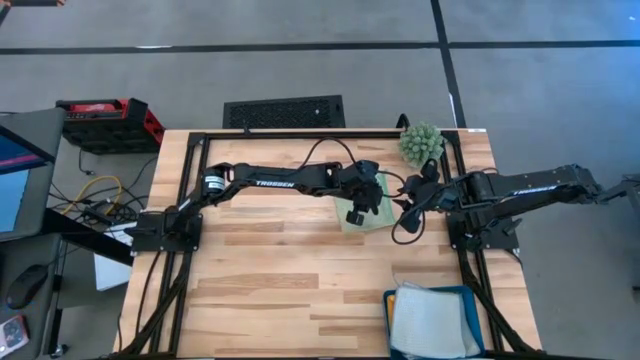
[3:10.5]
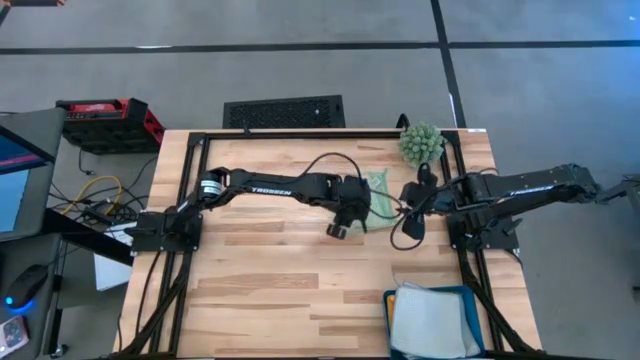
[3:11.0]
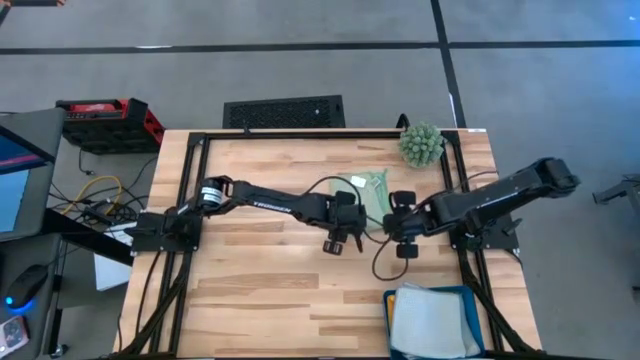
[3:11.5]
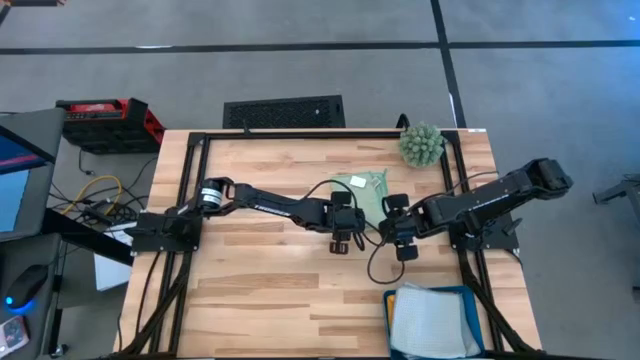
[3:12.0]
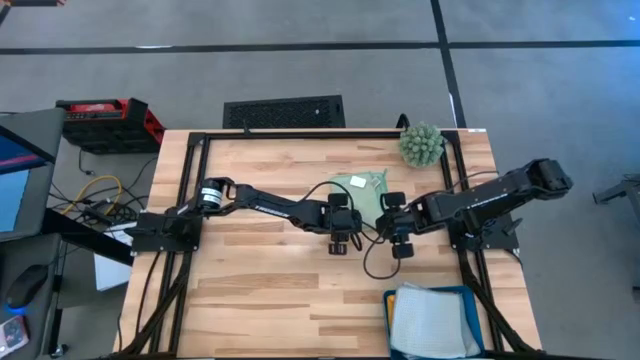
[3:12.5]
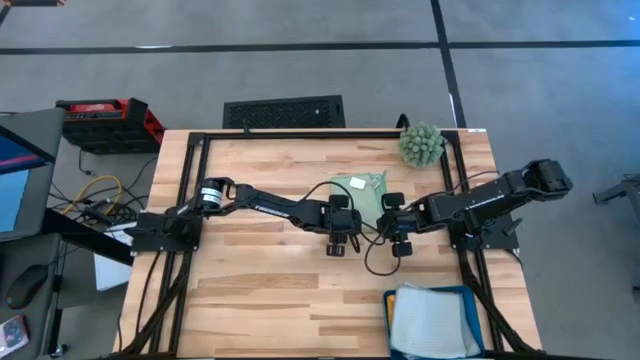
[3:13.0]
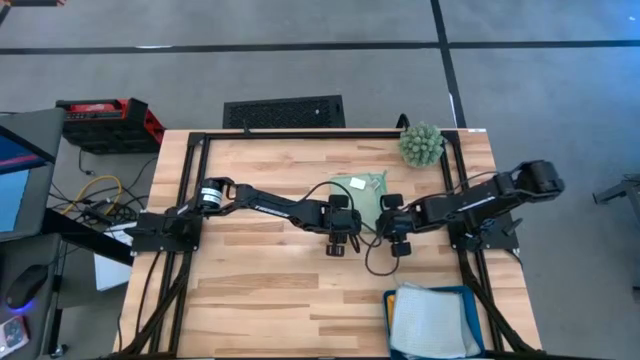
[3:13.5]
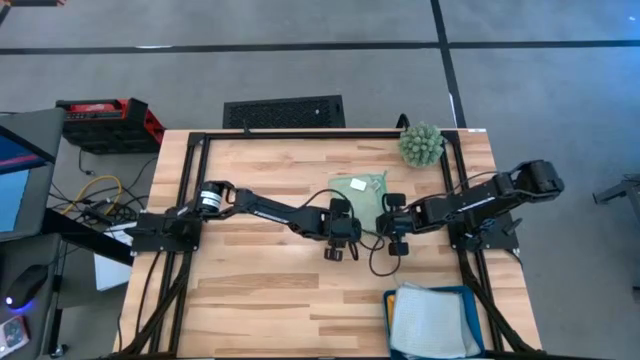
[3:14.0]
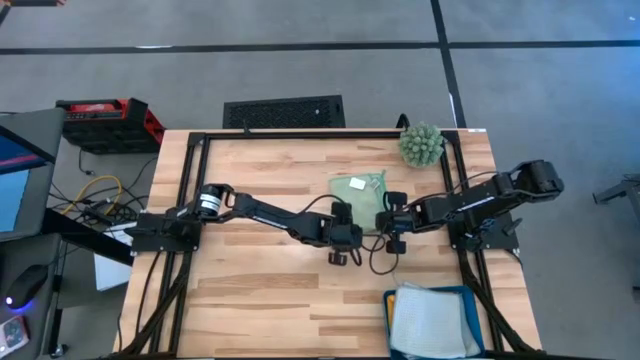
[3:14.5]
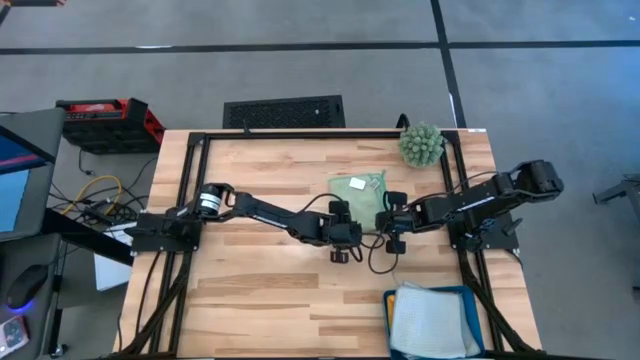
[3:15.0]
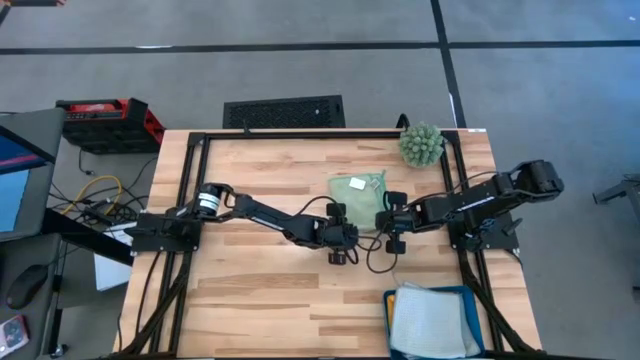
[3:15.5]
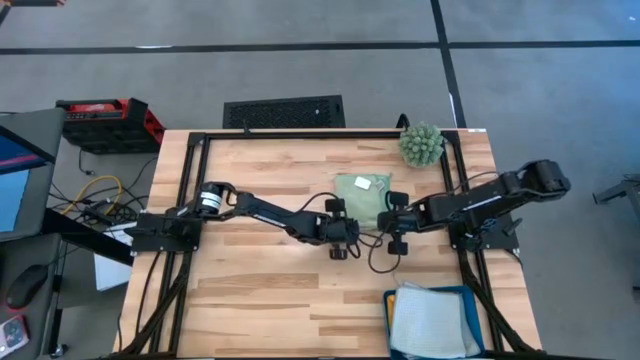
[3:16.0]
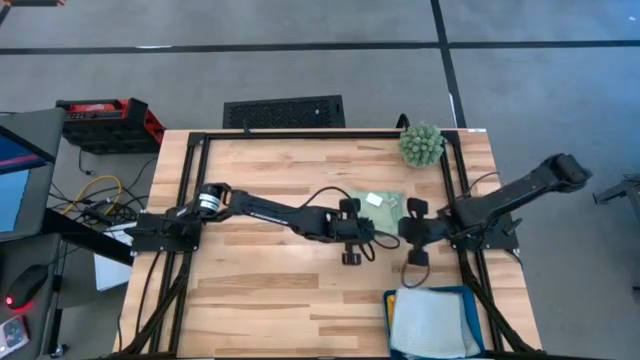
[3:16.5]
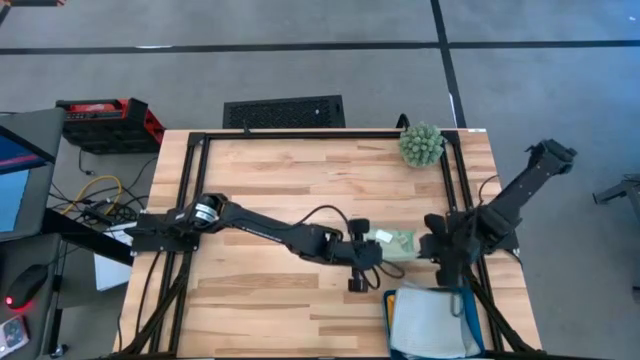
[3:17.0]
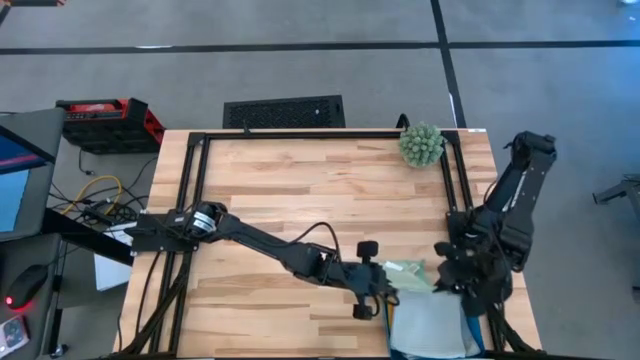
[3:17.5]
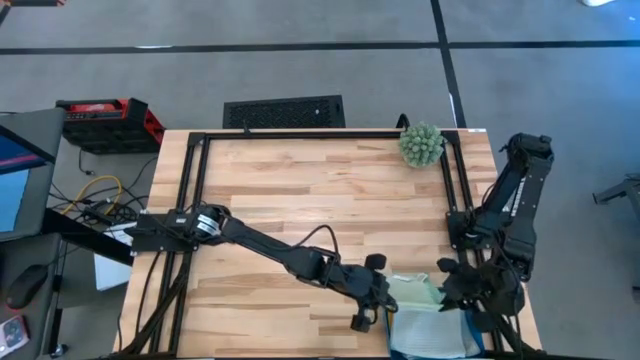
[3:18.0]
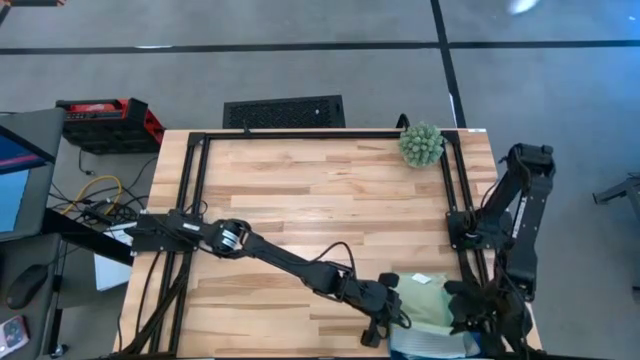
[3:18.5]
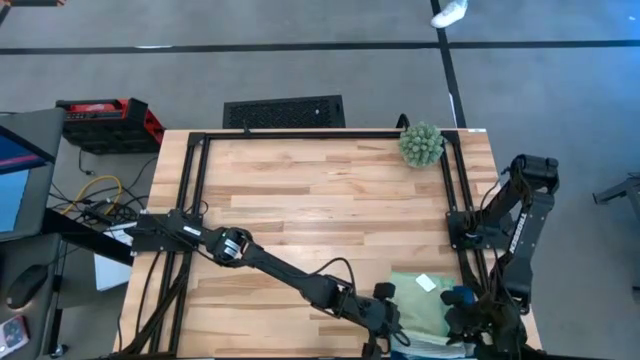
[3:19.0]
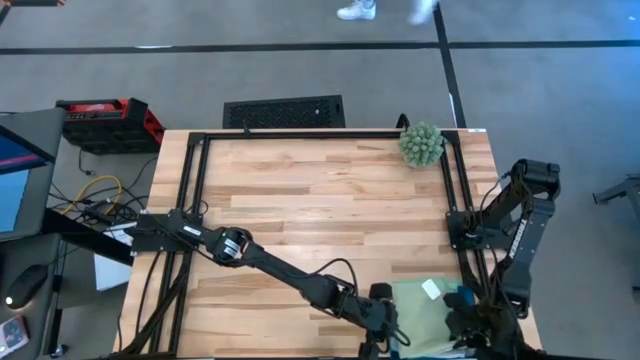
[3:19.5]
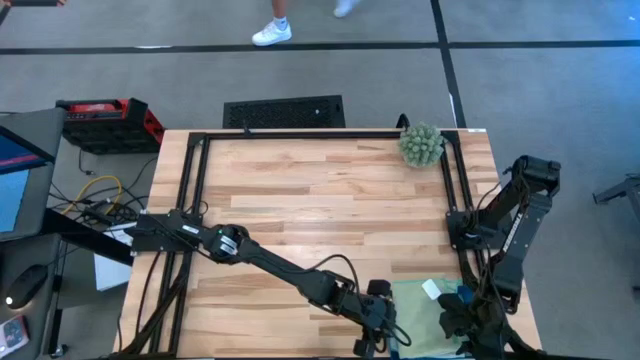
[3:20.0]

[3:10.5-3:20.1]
Task: Fold microfiber towels
Put the folded green towel into the blue bin

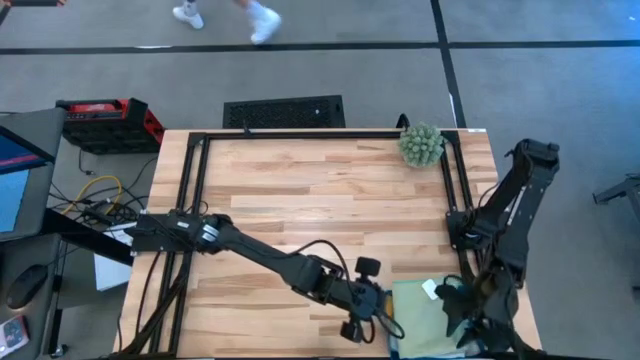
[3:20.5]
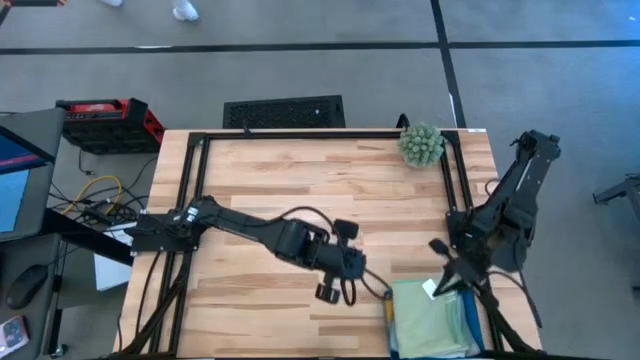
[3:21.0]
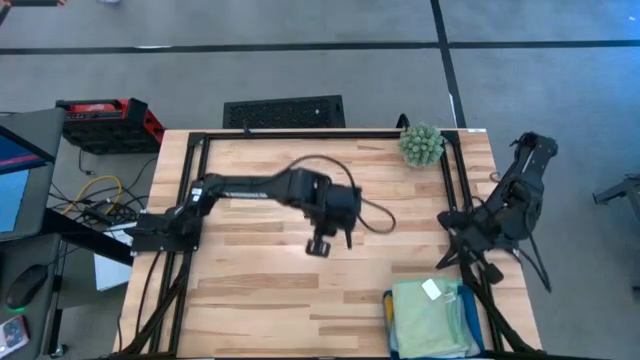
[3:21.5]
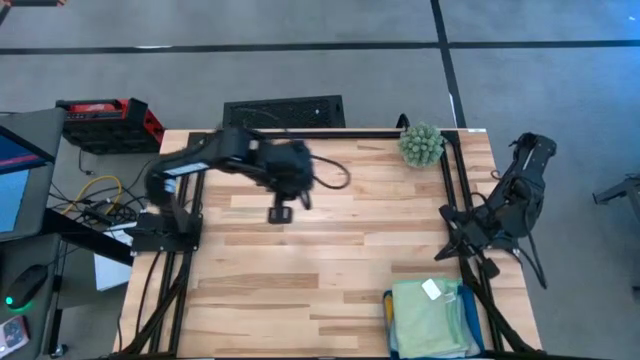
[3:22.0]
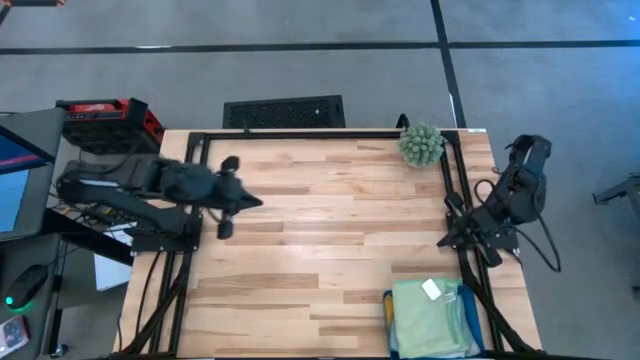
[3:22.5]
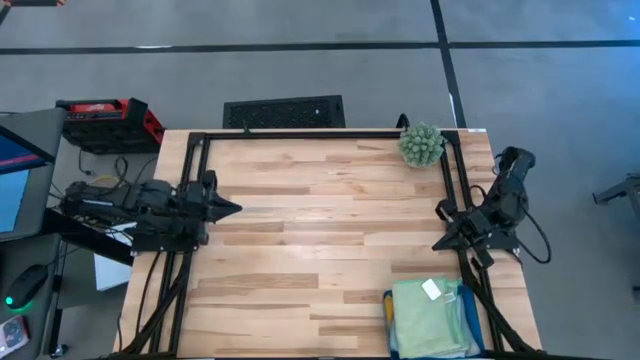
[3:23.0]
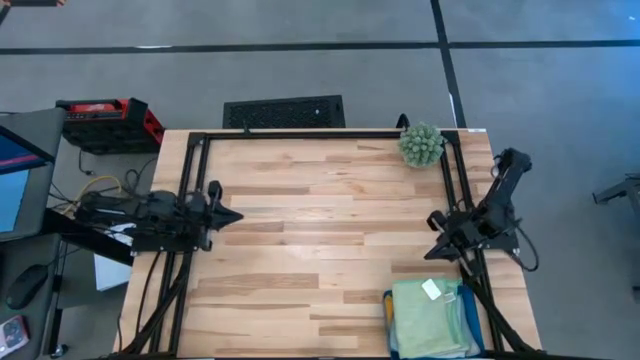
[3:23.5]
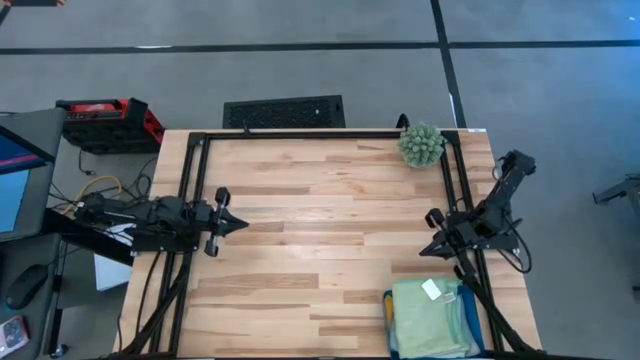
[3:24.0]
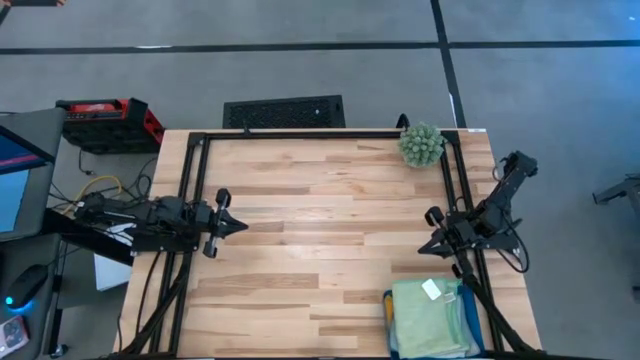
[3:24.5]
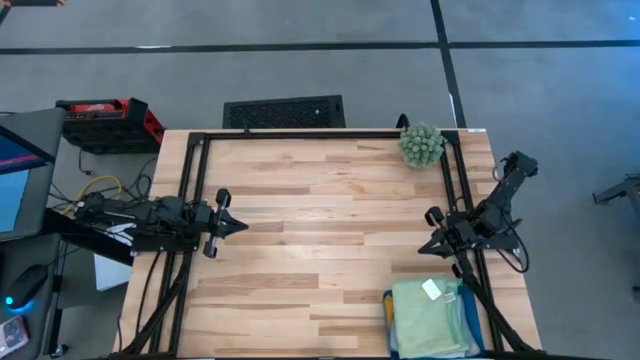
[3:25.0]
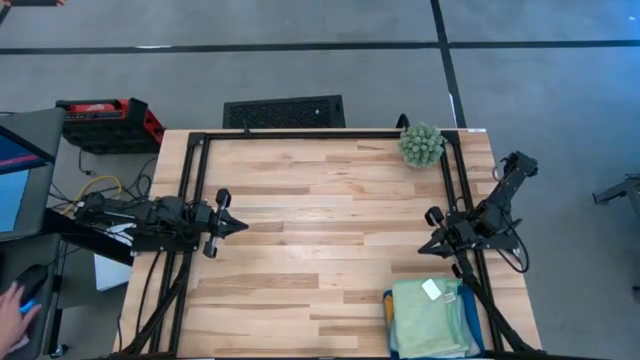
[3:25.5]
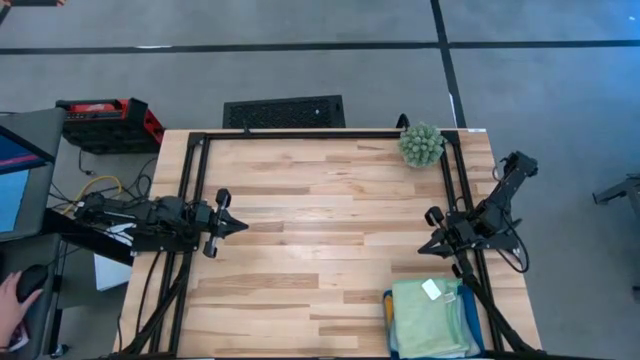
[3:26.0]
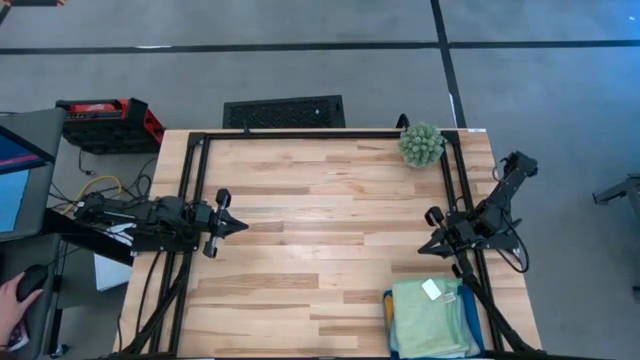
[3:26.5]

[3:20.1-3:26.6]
Return to Home Position

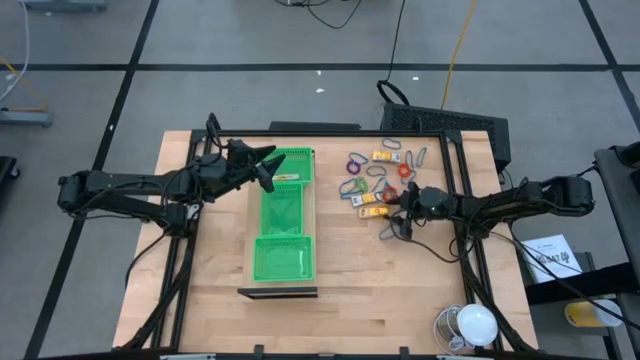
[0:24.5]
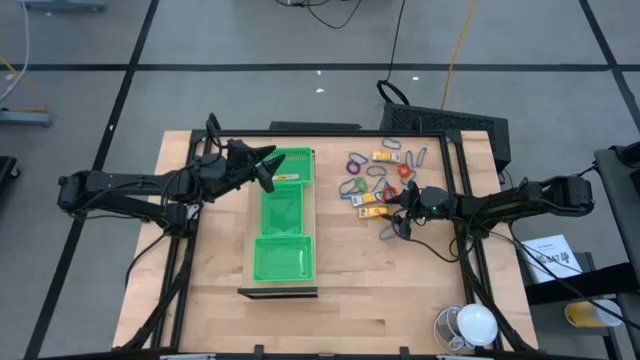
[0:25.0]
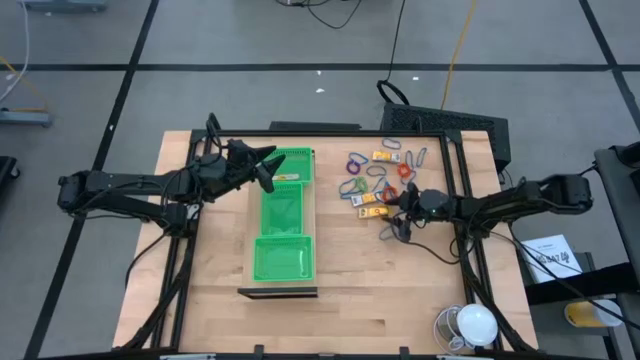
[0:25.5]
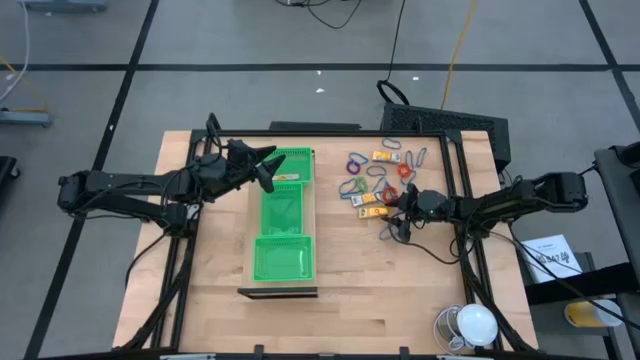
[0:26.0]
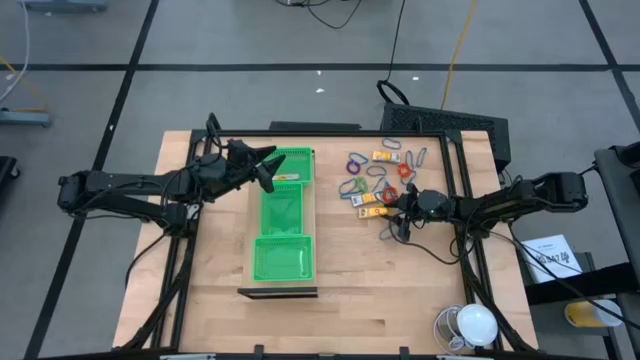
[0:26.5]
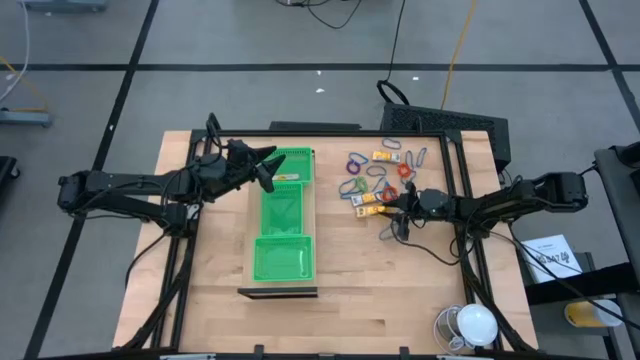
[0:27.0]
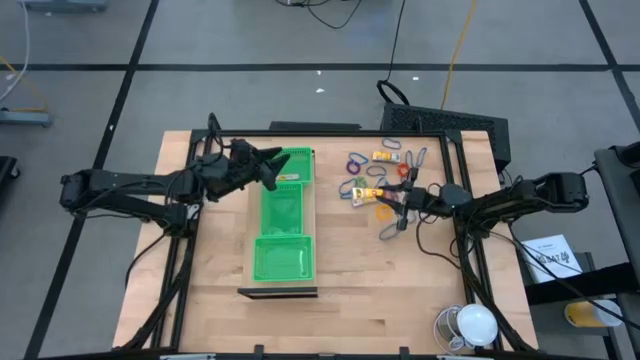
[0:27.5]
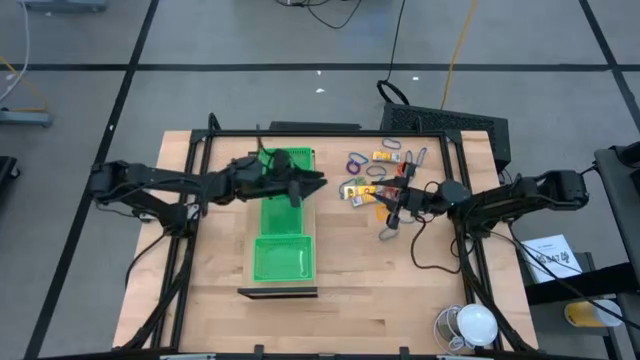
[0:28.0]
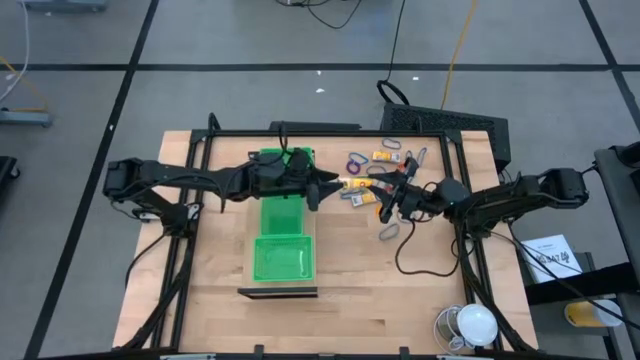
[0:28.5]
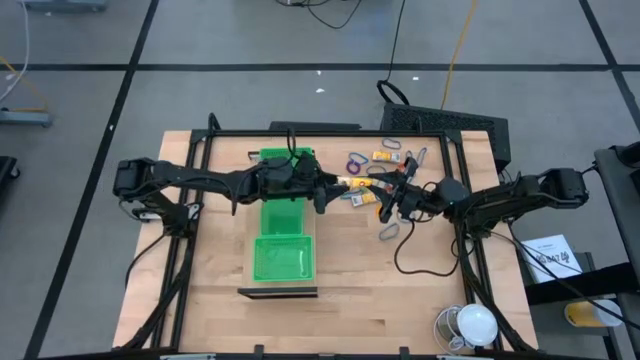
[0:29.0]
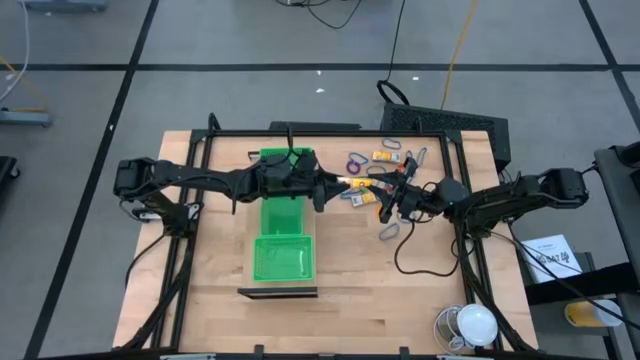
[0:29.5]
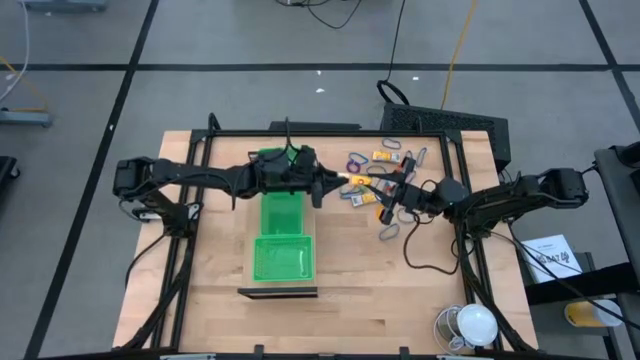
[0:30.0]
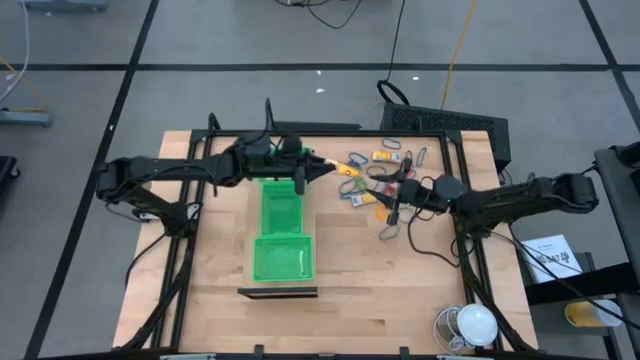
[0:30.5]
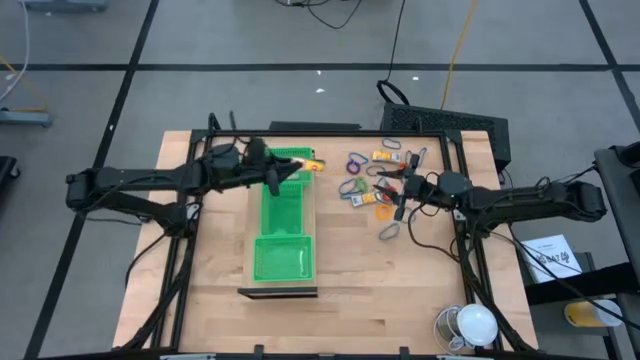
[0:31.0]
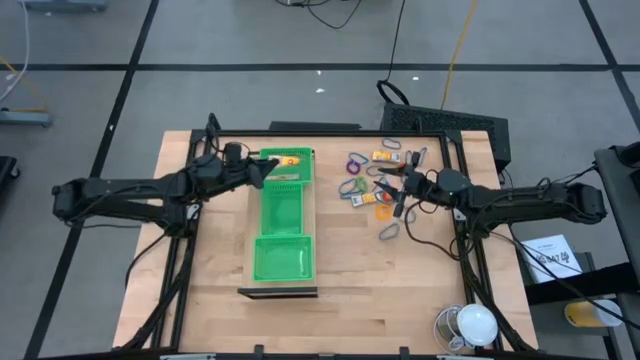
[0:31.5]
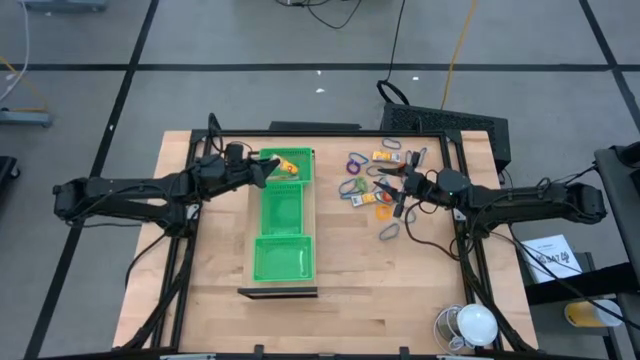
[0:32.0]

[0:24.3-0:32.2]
Task: Pick & Place Office Desk Supplies
Put the yellow crayon box into the top green bin on the shelf
